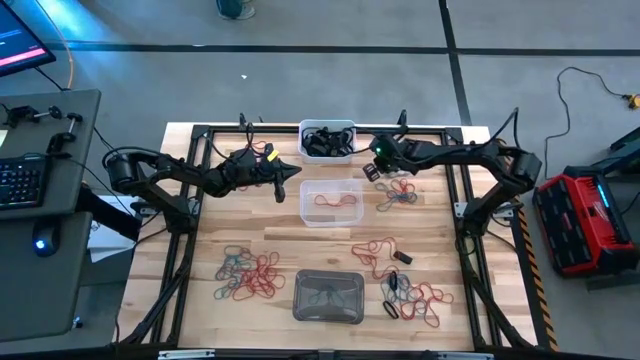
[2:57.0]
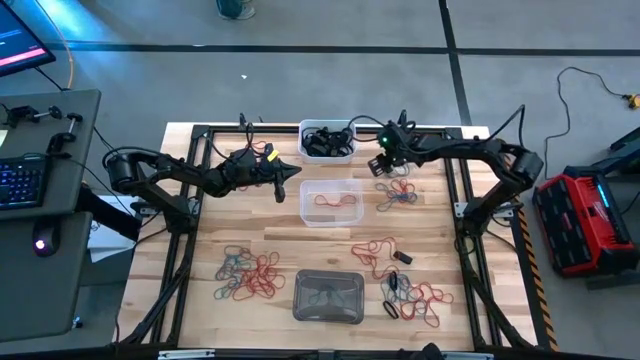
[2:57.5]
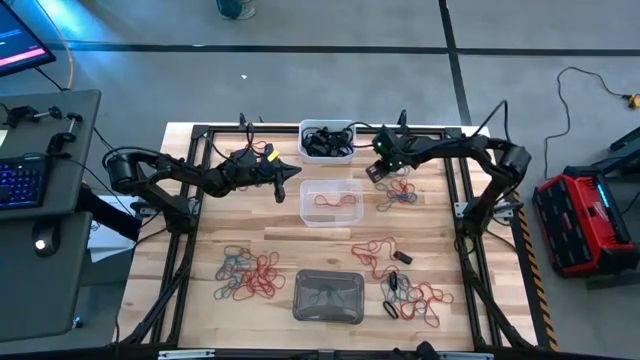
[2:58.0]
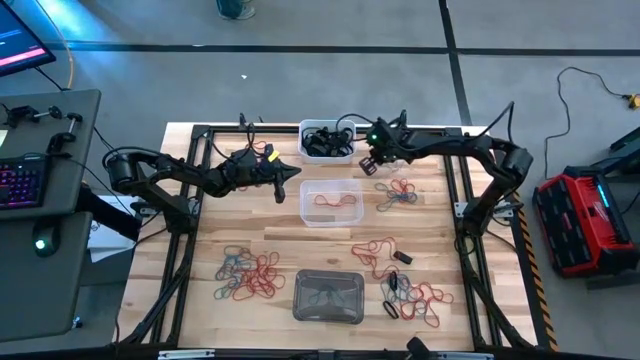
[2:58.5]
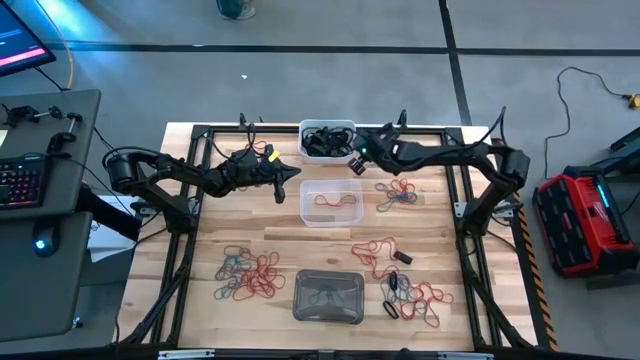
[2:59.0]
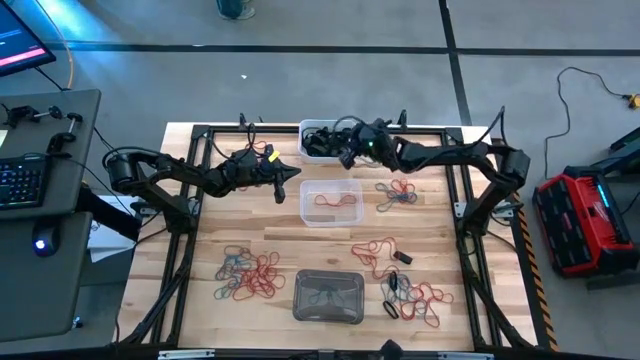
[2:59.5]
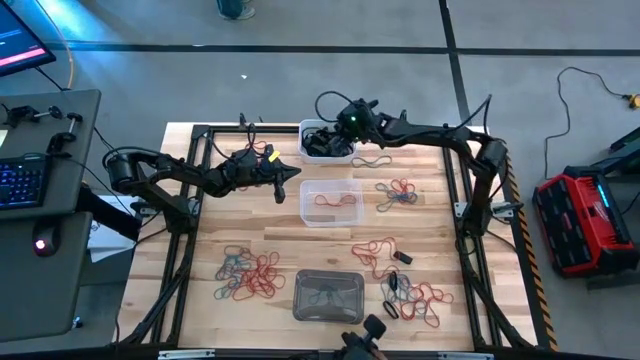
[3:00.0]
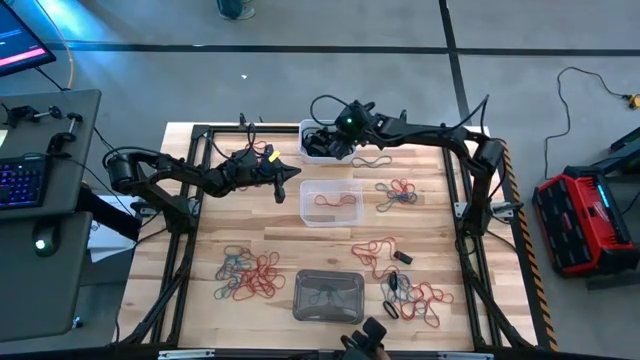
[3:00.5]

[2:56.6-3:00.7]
Task: Sort rubber bands into baskets
Put the black rubber band into the white bin

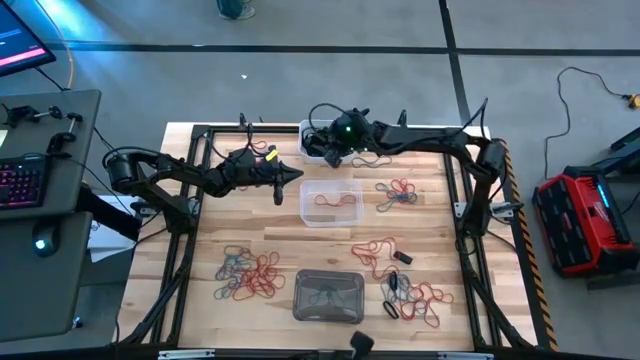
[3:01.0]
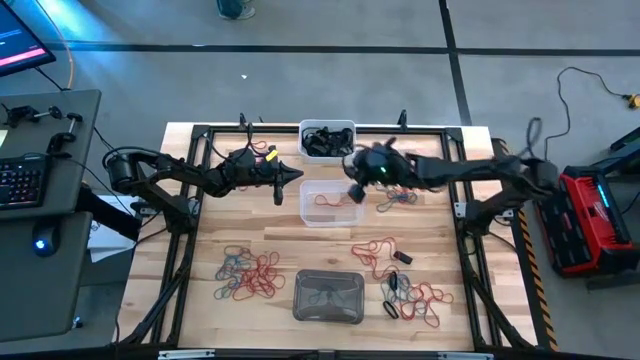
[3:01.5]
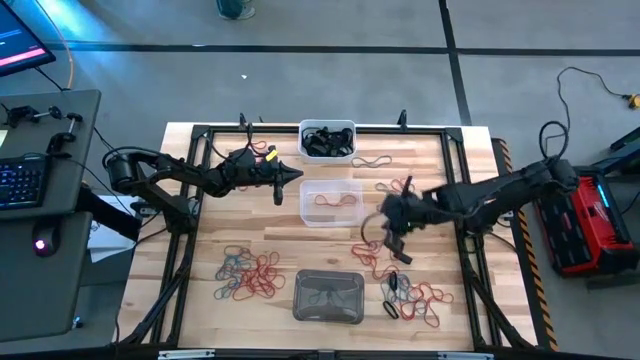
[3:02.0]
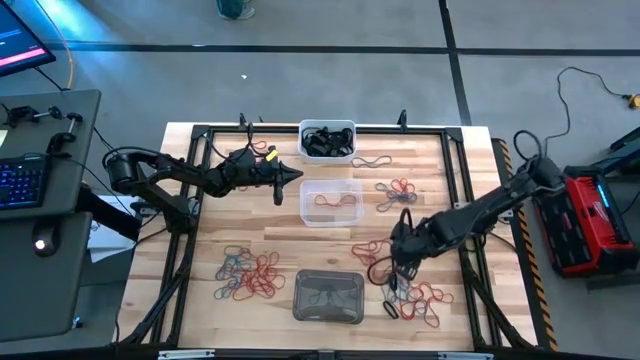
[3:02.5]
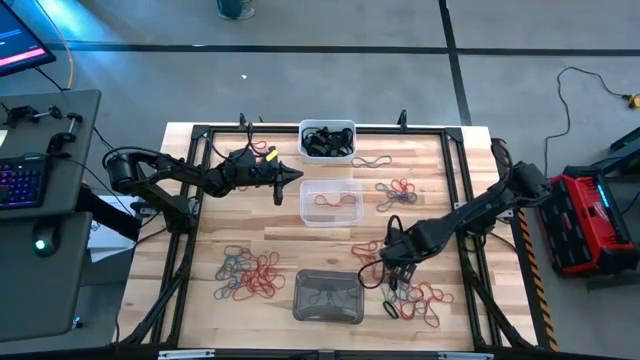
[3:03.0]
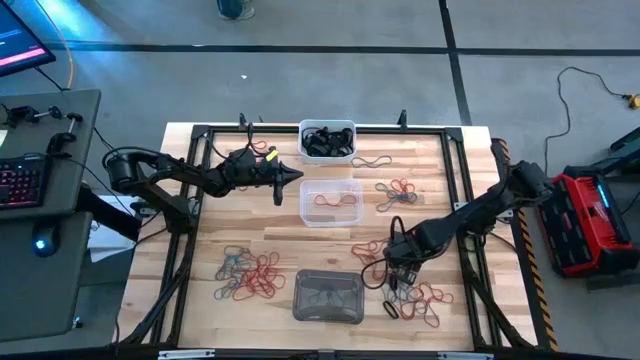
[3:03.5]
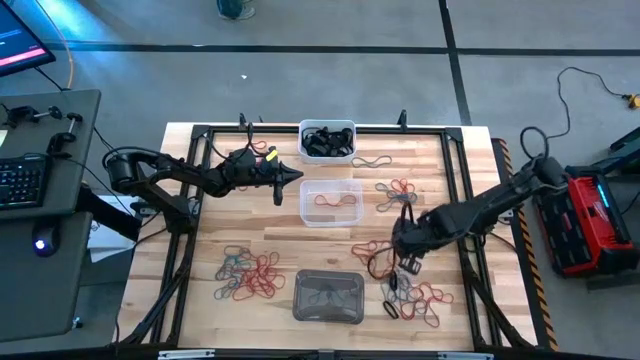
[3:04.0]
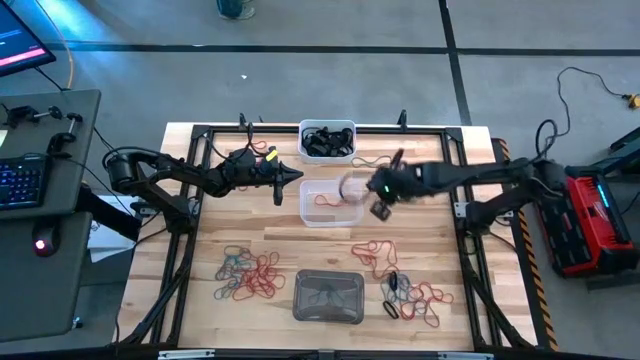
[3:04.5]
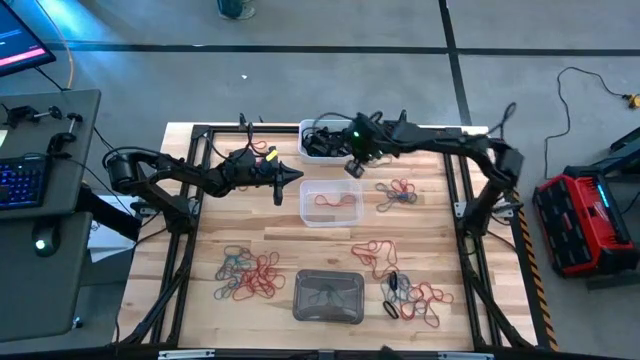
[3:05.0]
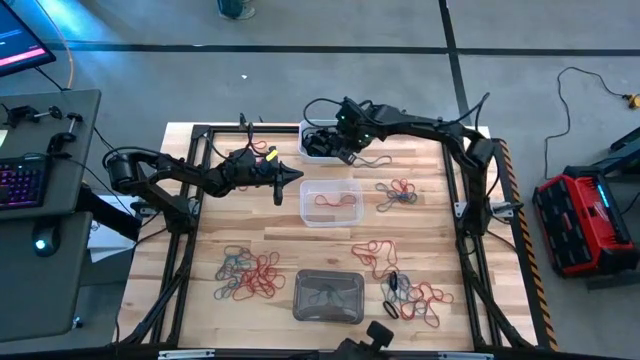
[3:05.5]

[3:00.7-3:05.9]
Put the black rubber band into the white bin

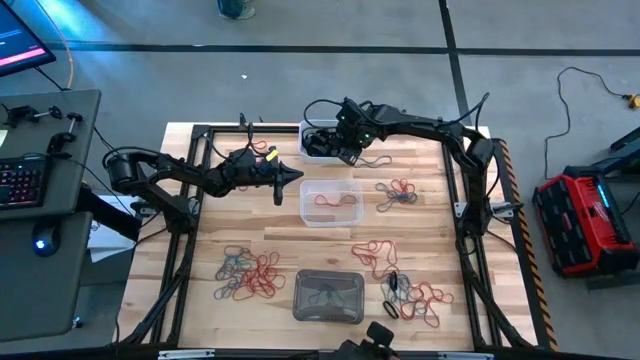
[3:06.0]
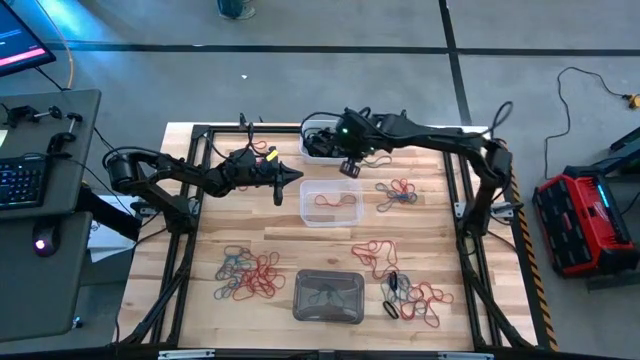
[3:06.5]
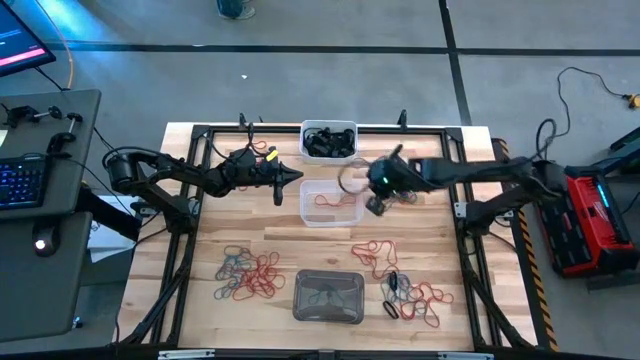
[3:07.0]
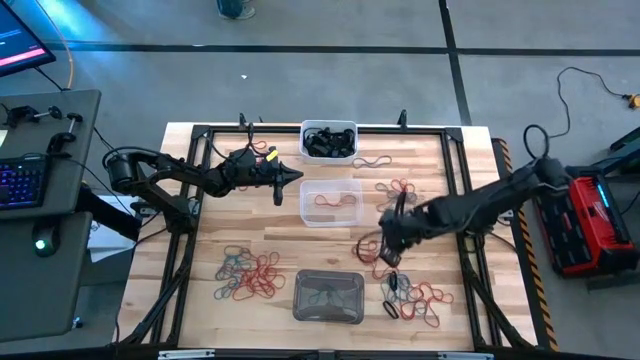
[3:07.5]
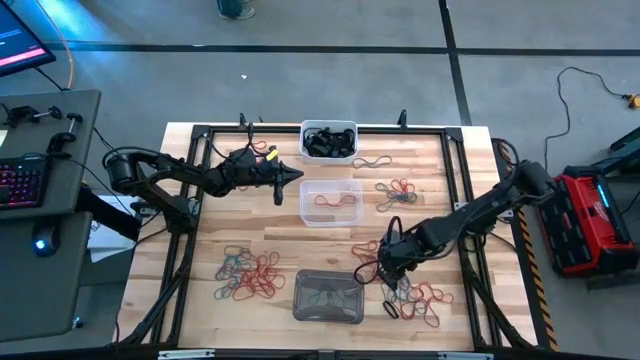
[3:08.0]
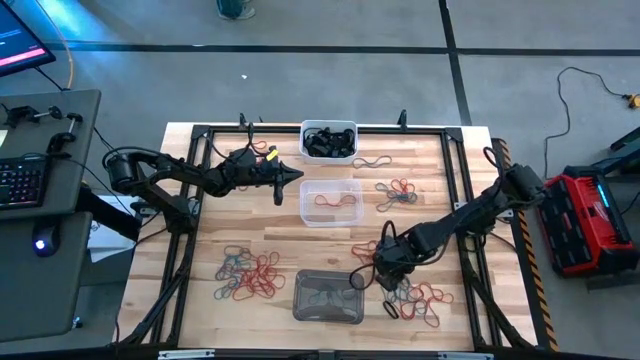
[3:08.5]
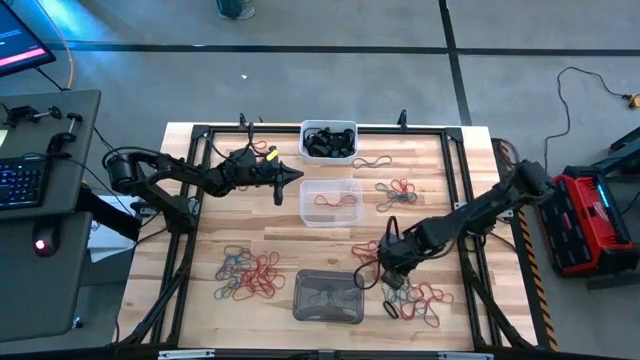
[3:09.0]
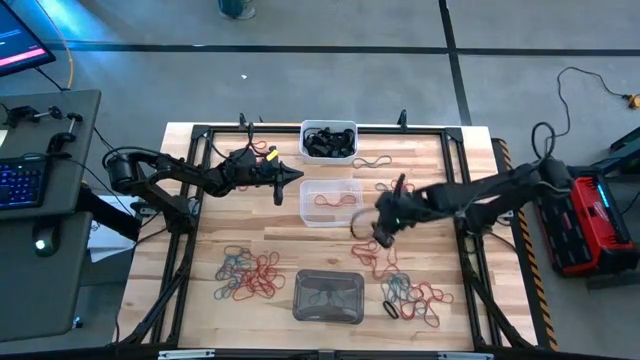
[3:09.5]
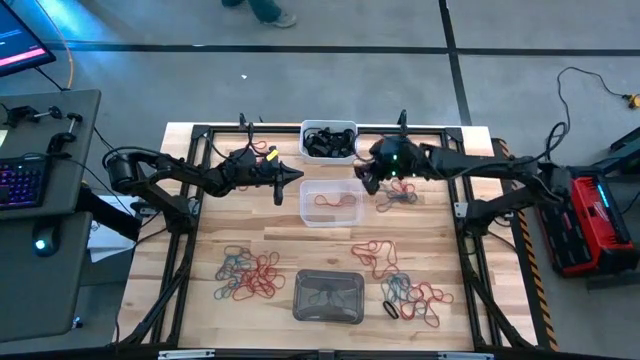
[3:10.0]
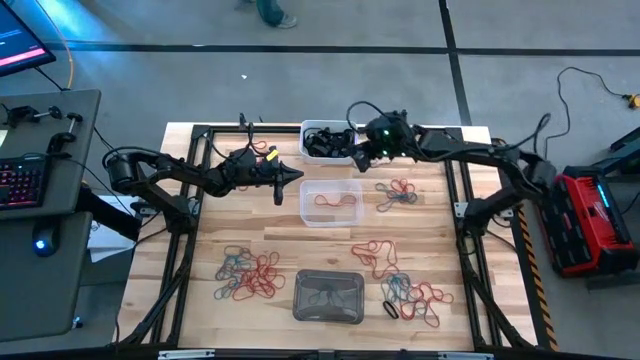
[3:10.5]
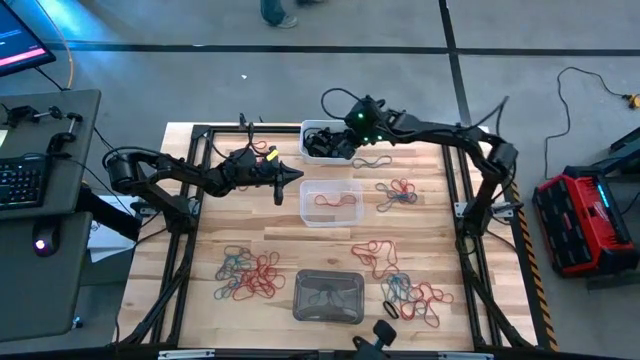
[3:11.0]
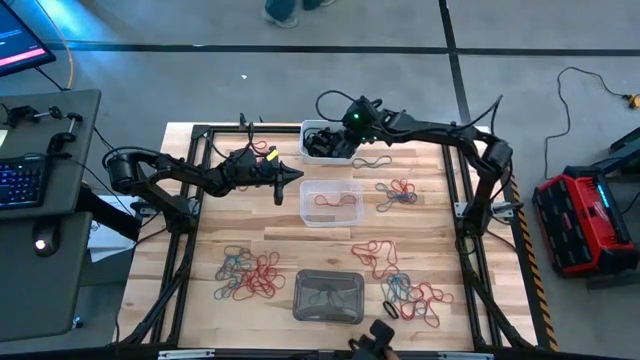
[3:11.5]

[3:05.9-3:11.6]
Put the black rubber band into the white bin

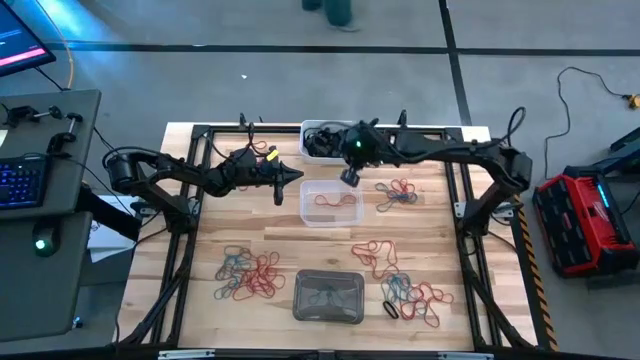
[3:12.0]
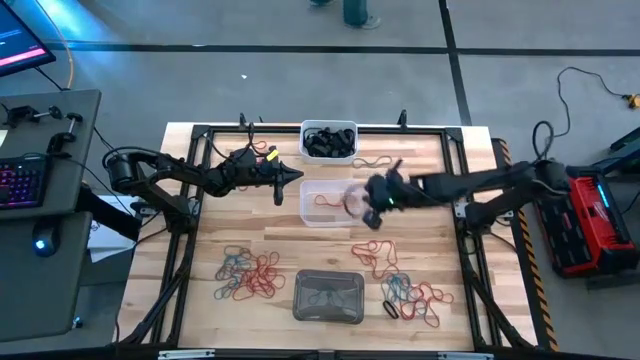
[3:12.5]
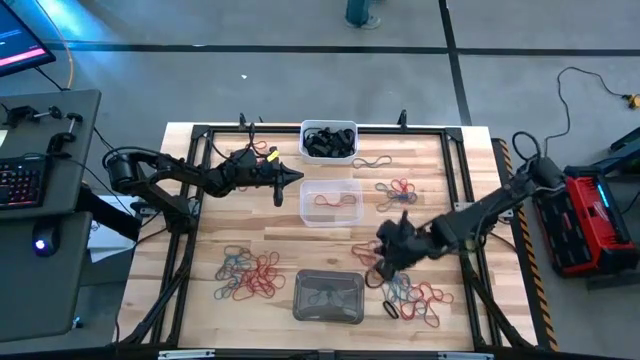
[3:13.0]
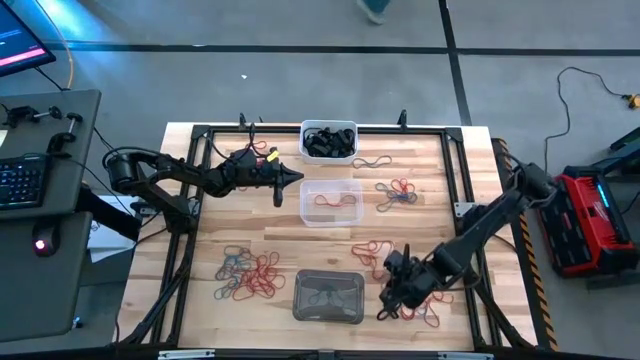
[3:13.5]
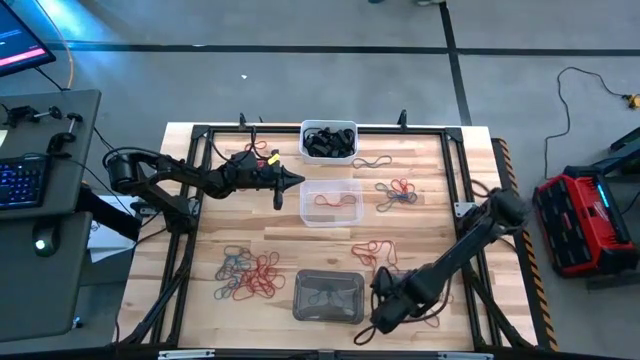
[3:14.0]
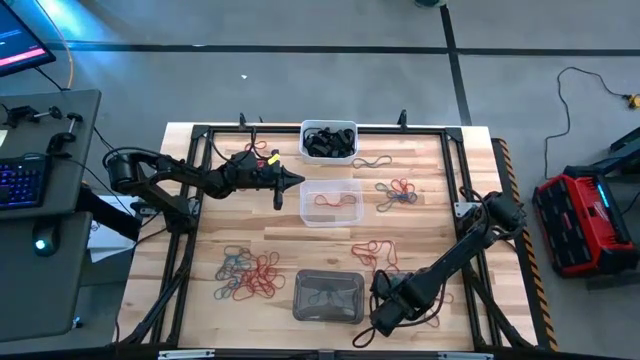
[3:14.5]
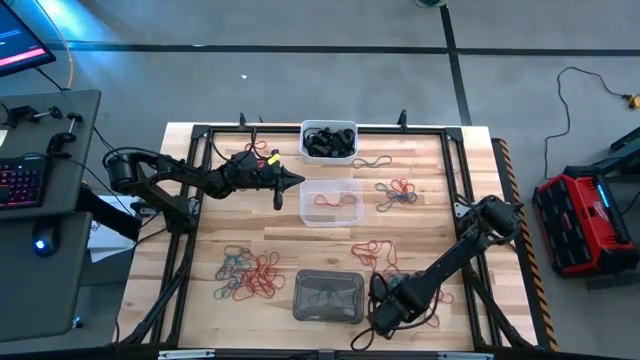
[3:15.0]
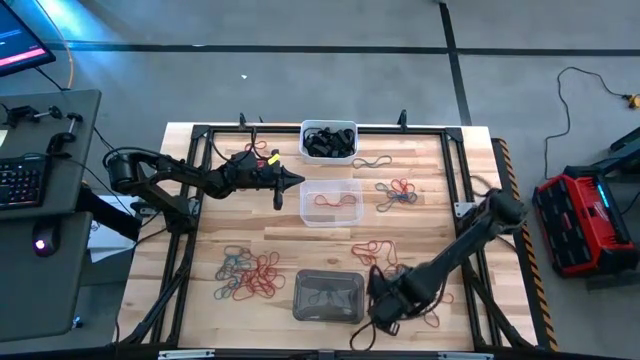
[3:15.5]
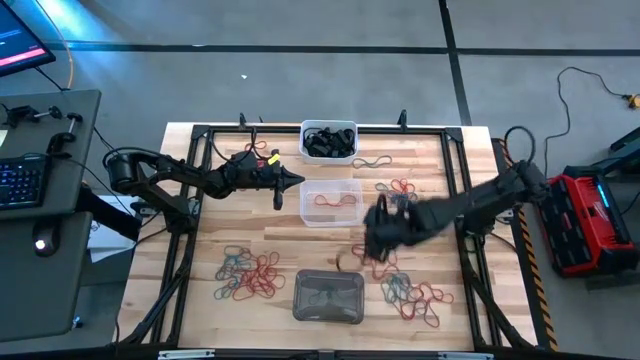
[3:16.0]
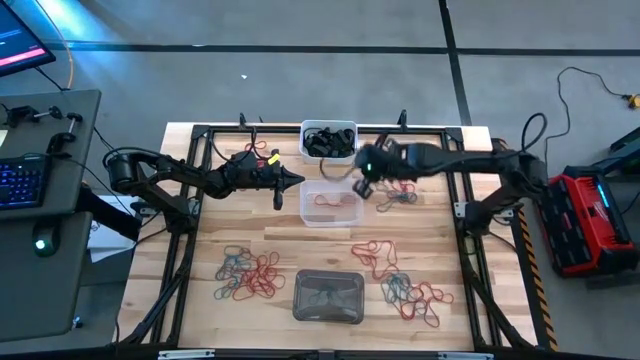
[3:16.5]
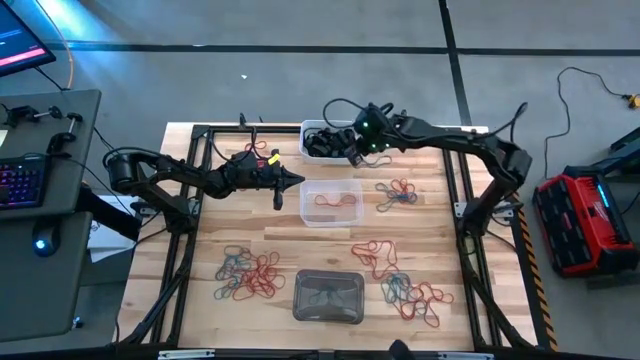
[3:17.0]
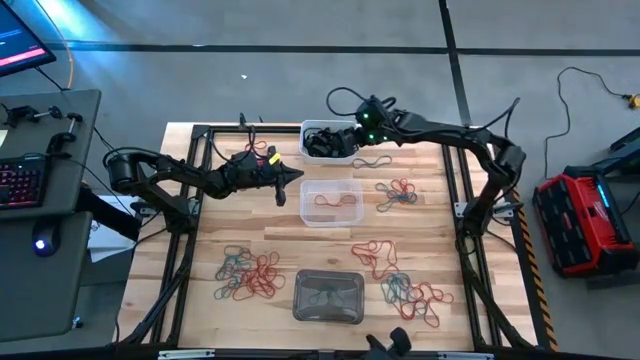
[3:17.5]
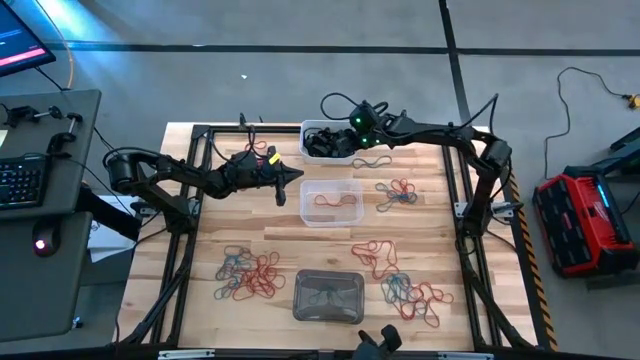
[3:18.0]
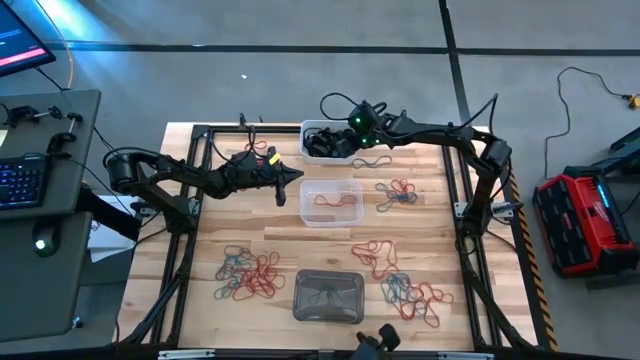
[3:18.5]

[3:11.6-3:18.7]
Put the black rubber band into the white bin
